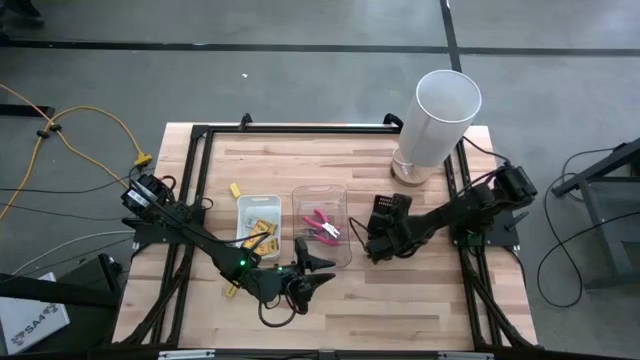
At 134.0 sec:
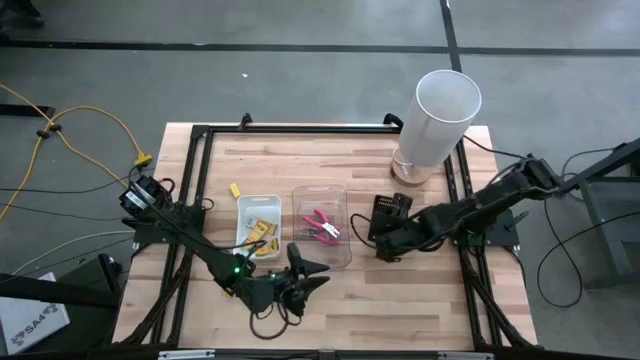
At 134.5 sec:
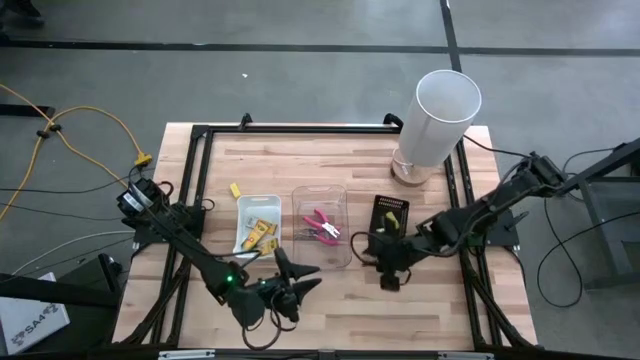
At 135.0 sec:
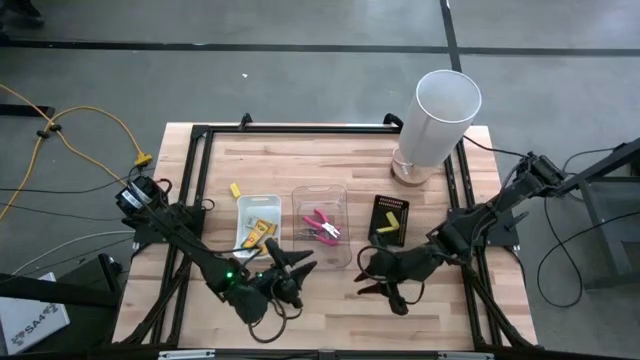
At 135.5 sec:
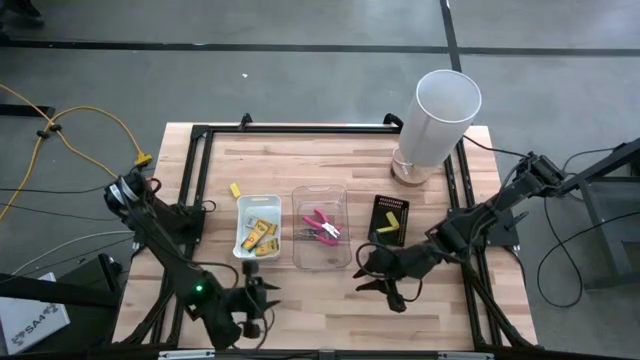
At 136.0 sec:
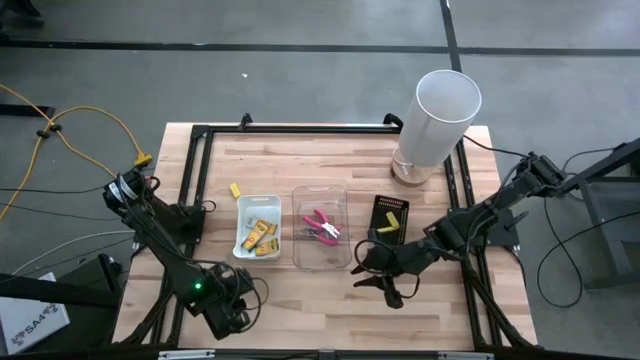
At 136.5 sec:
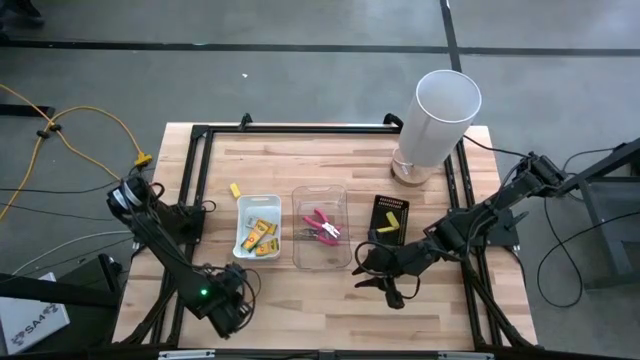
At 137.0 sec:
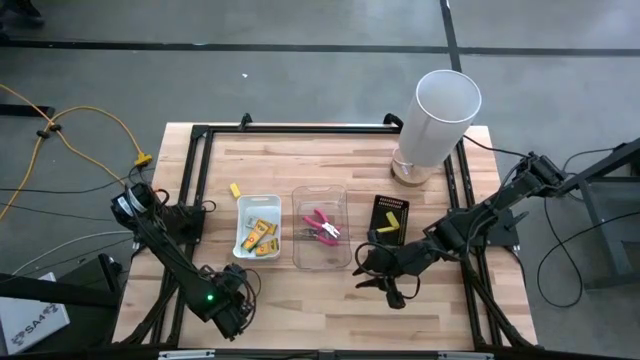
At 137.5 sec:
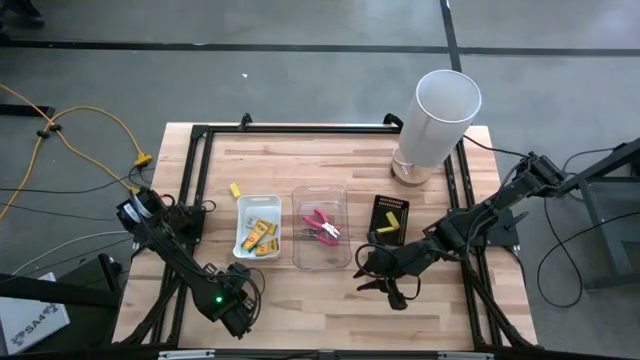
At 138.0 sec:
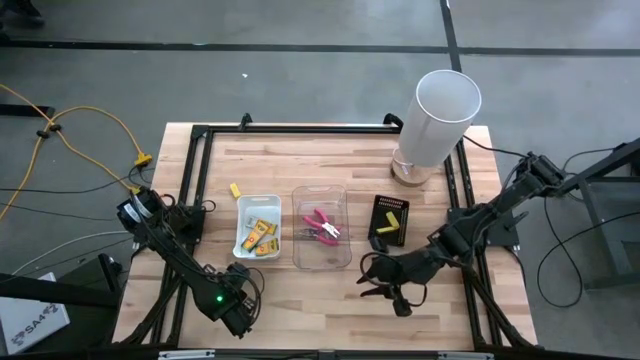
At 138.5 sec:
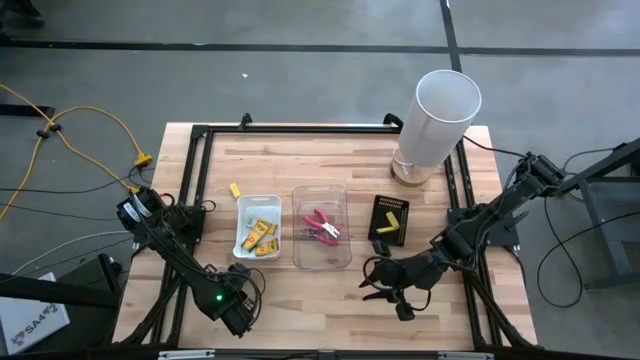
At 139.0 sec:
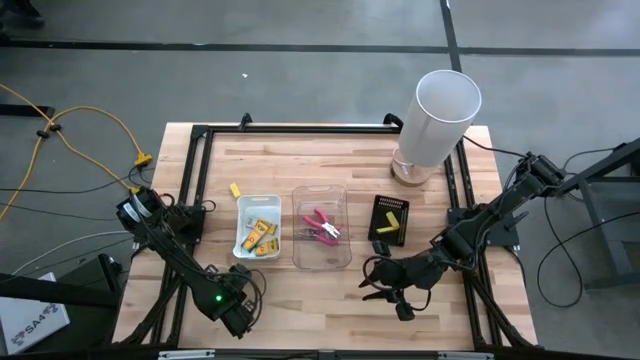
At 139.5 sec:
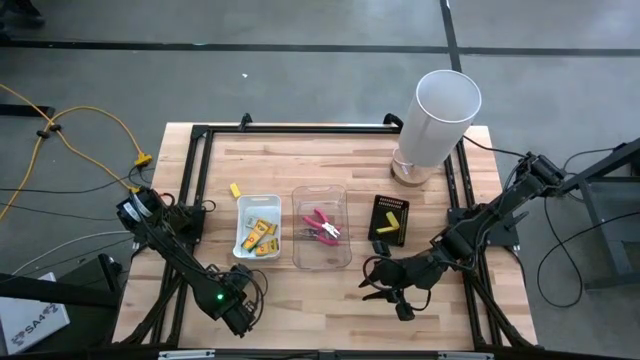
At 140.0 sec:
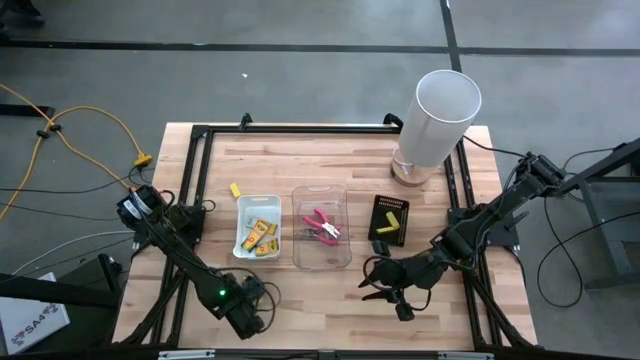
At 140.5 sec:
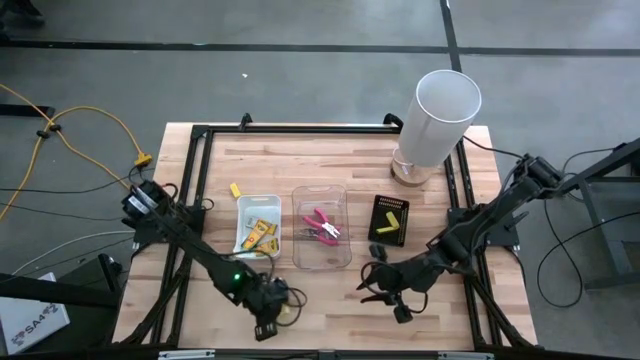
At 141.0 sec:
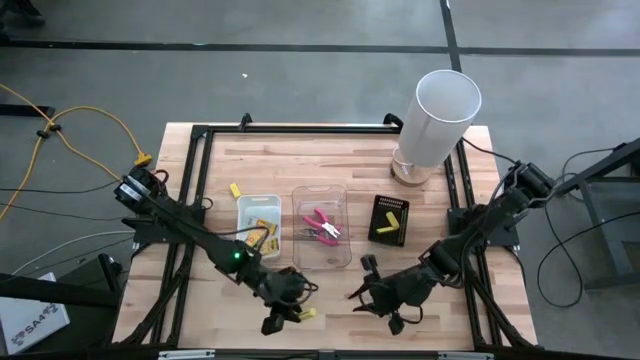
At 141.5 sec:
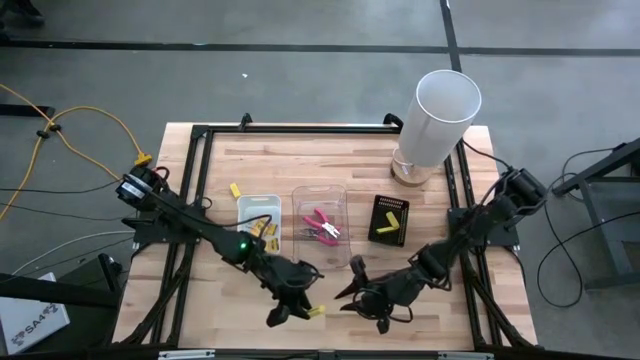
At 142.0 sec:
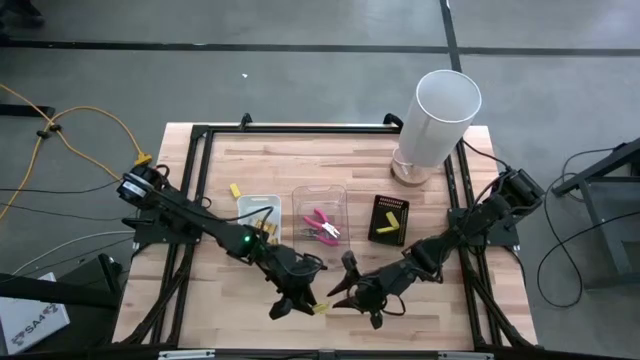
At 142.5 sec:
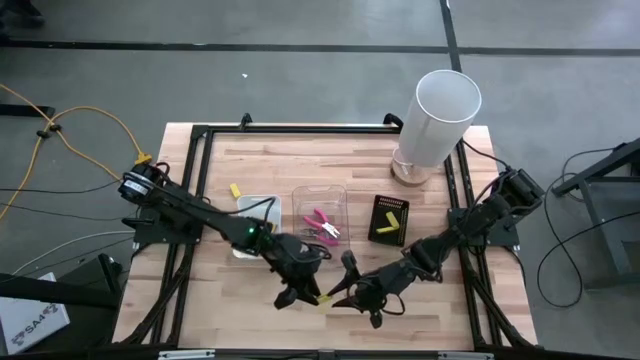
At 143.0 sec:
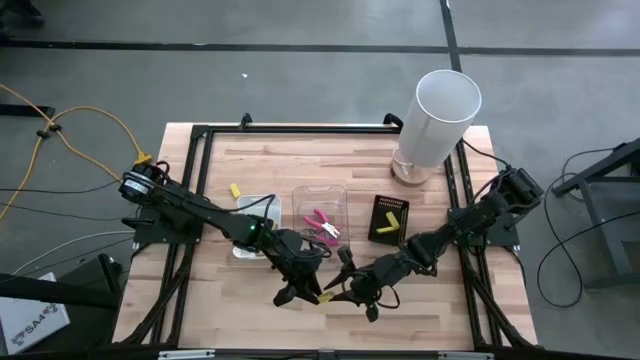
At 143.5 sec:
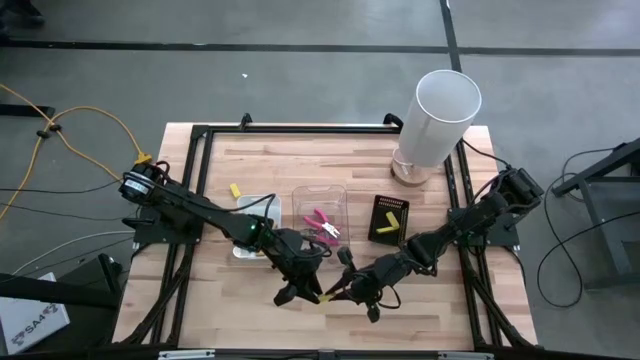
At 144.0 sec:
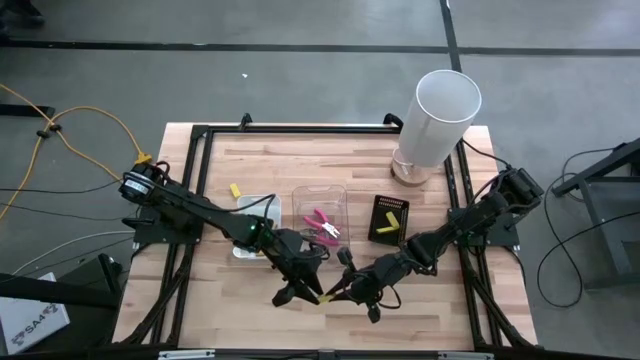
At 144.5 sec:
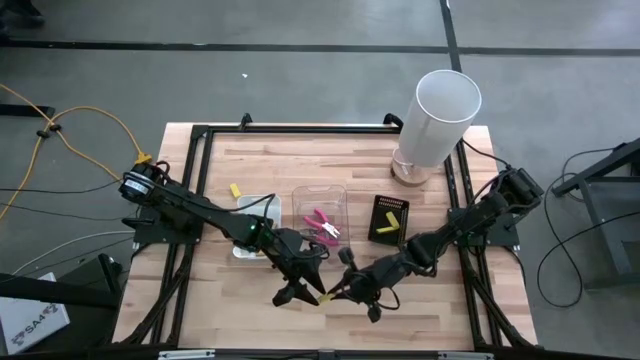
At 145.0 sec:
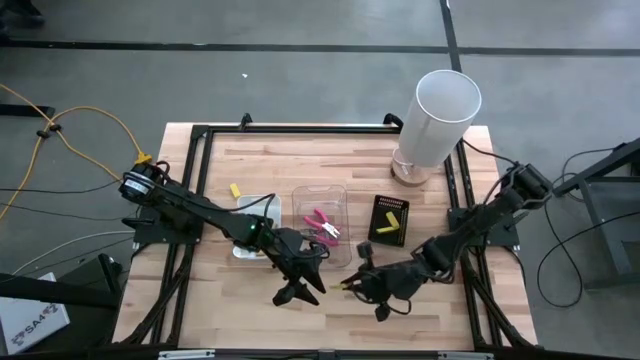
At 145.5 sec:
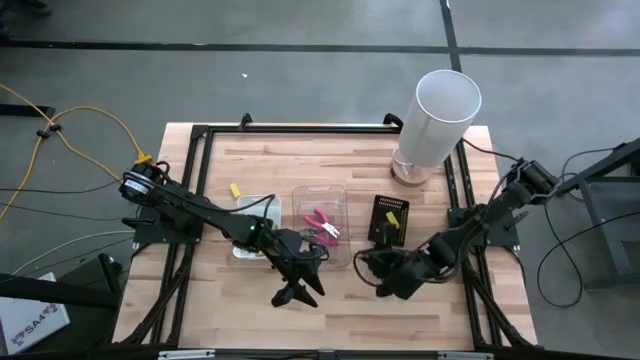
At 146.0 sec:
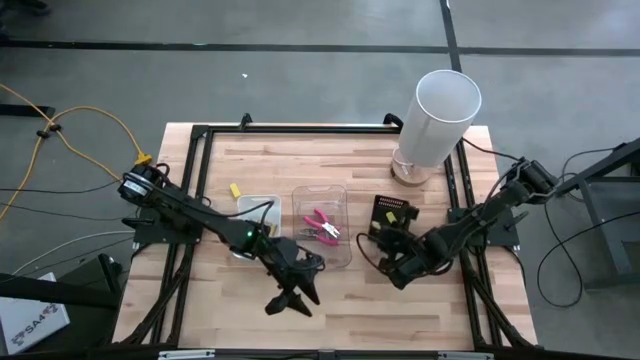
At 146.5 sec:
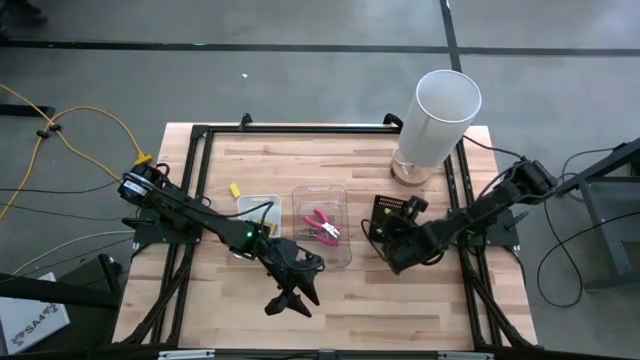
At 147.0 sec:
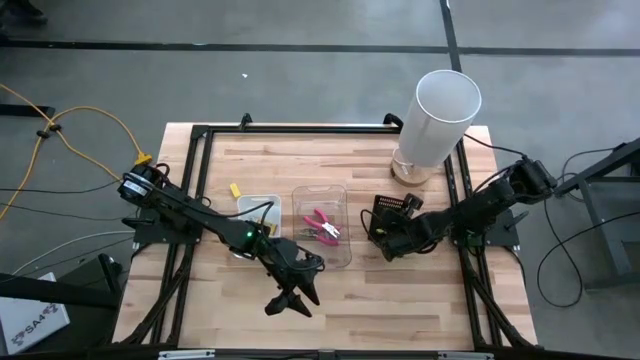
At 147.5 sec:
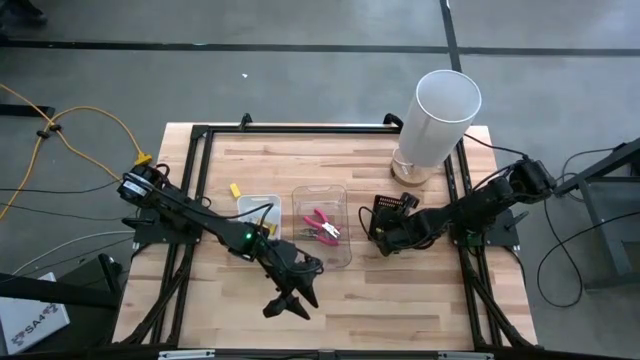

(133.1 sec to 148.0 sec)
Task: Pick & Place School Supplies
Put the yellow eraser into the black basket

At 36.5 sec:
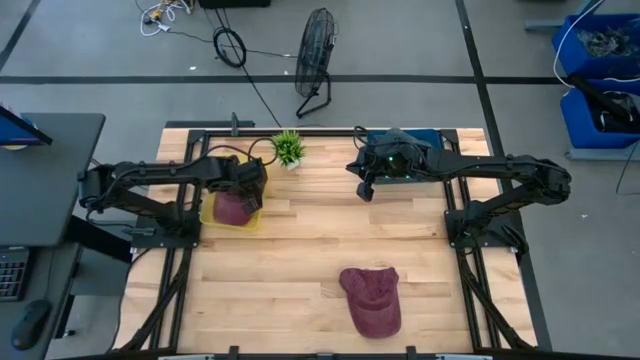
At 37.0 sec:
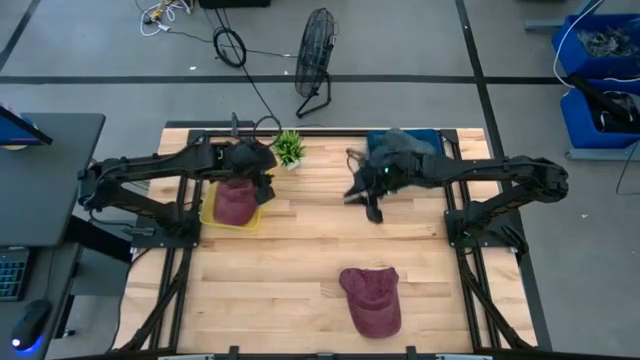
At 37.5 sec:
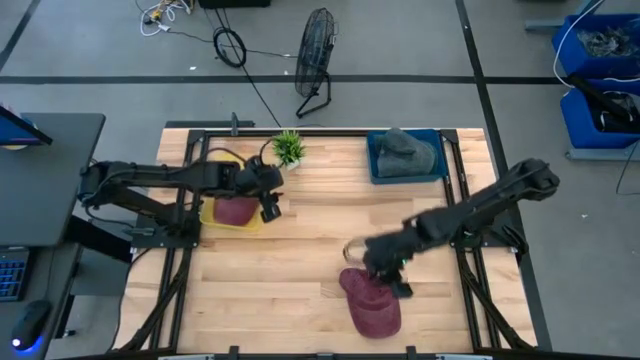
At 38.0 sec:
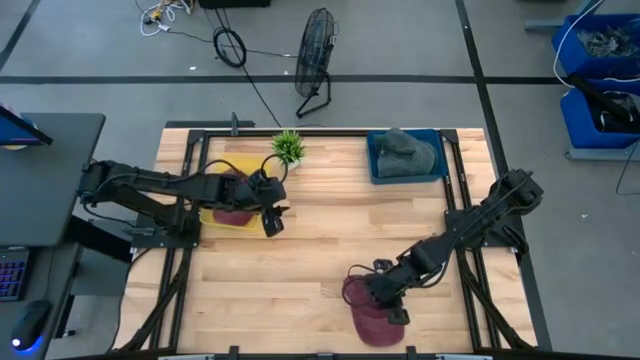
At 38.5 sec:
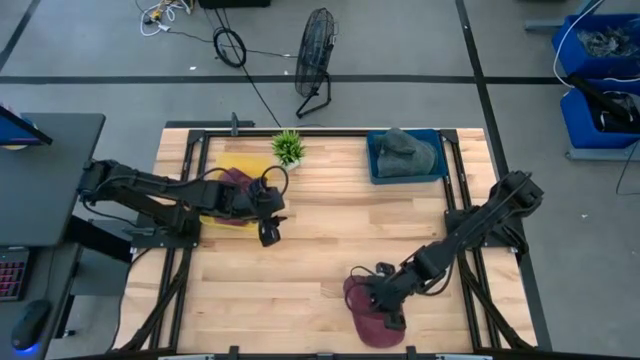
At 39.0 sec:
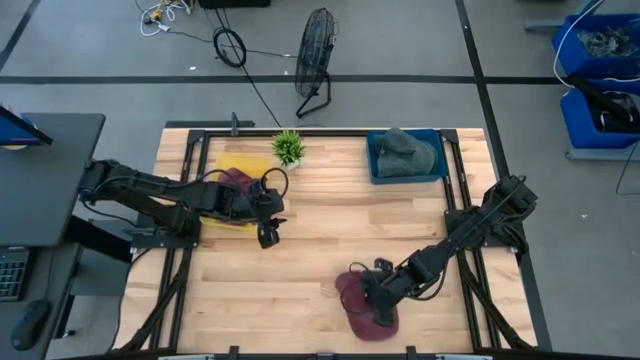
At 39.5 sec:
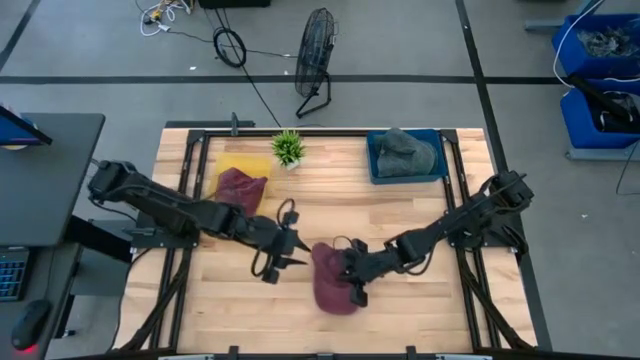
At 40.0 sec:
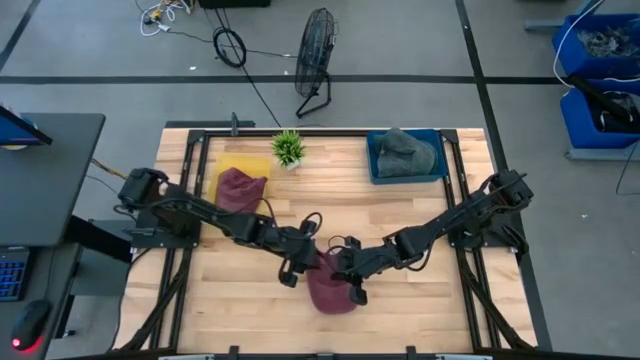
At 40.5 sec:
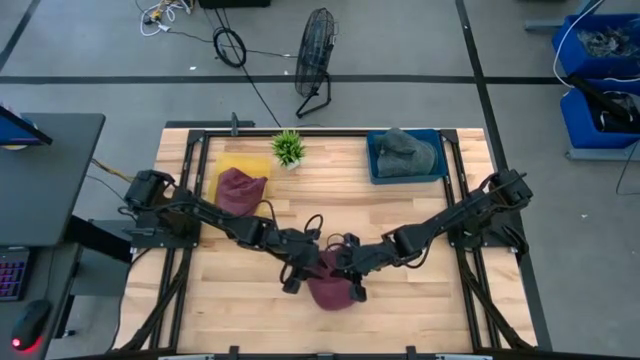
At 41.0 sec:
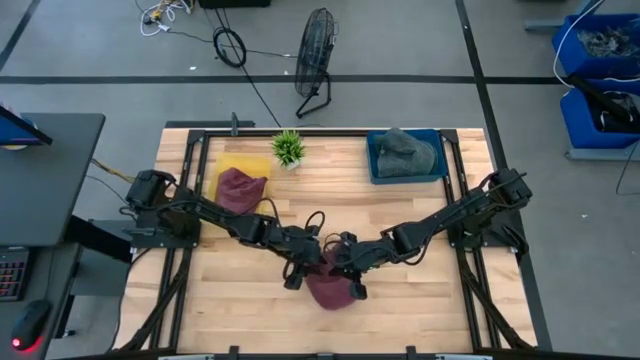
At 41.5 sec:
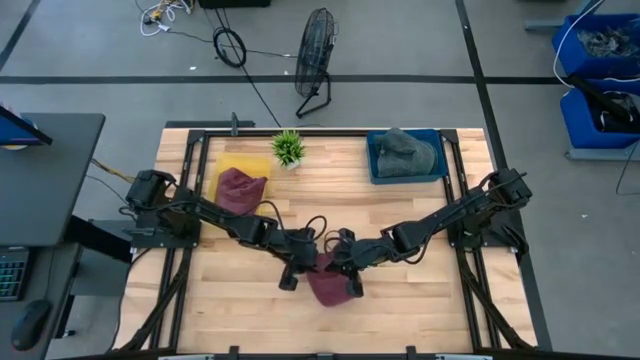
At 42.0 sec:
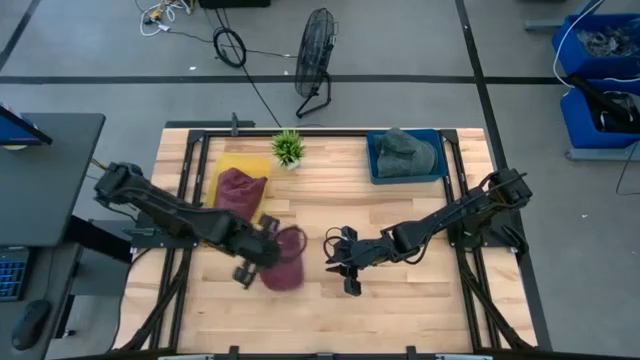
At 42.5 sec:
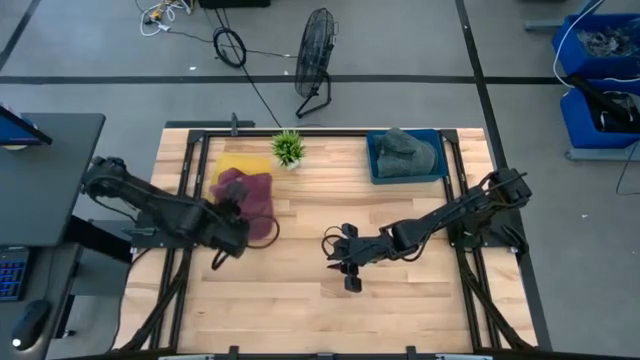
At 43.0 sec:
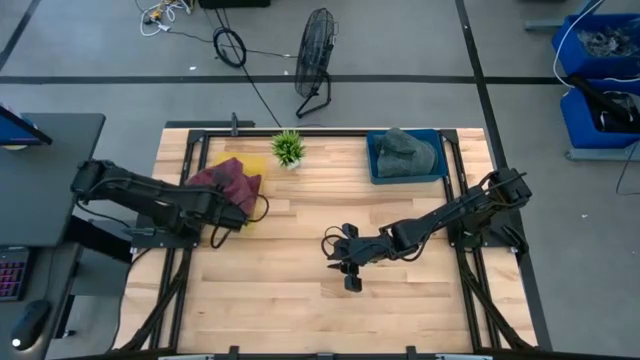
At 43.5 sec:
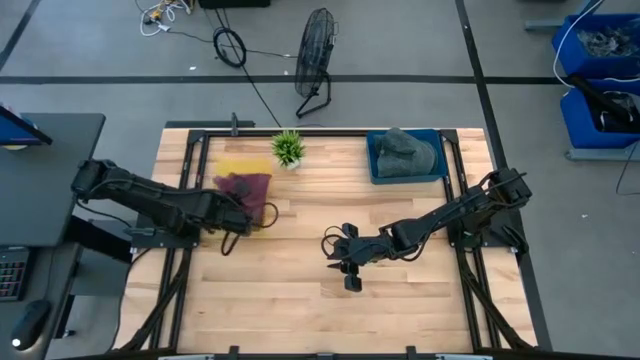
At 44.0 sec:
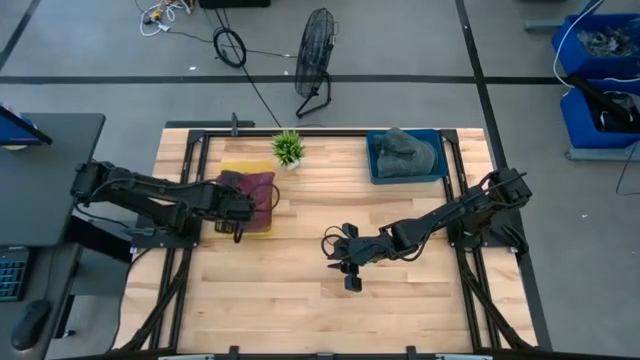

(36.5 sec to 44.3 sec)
Task: Pick & Place hat
Put the red cap into the yellow bin
